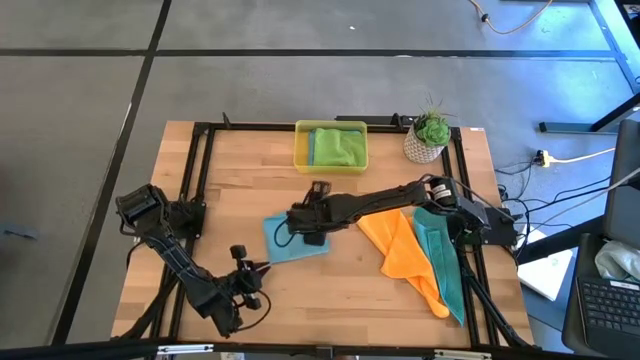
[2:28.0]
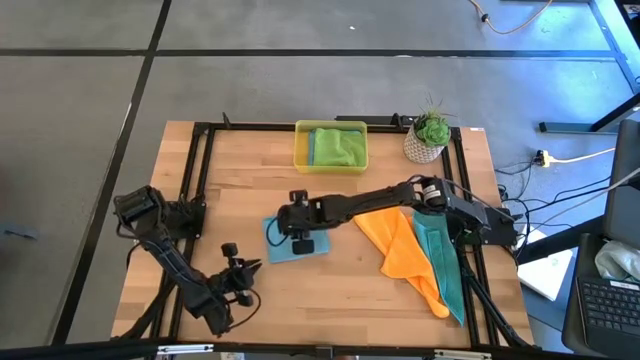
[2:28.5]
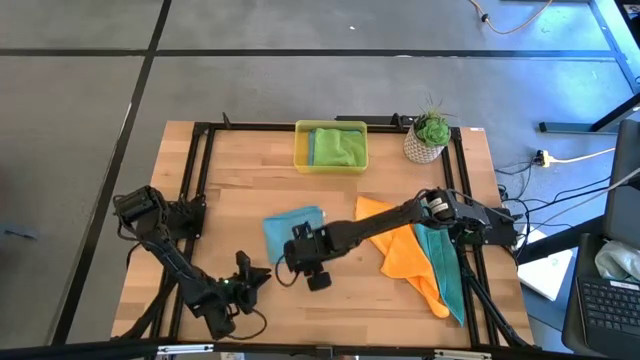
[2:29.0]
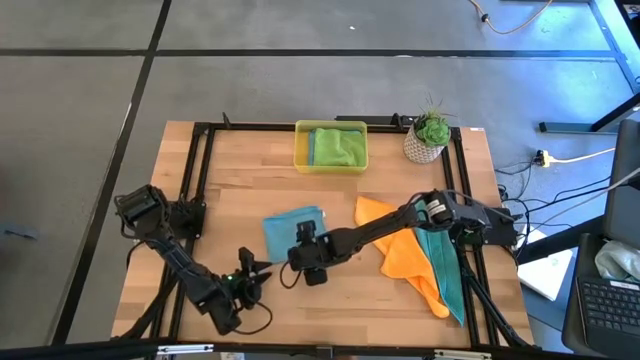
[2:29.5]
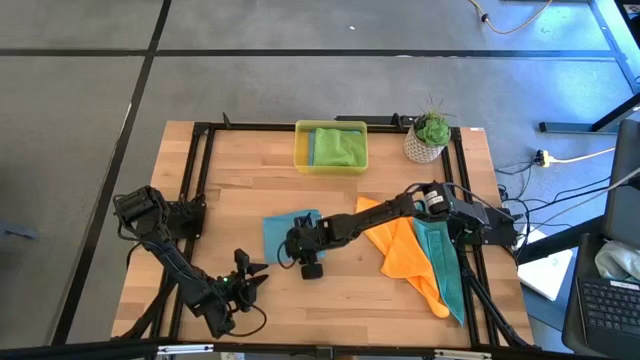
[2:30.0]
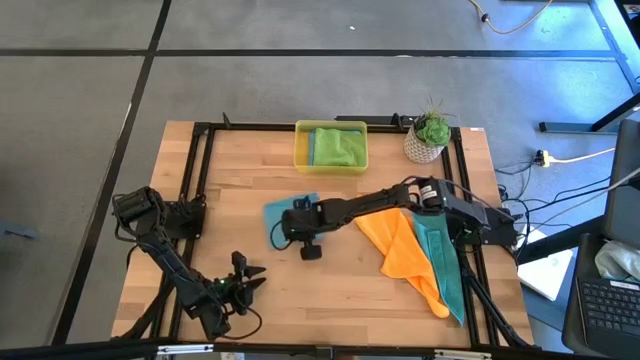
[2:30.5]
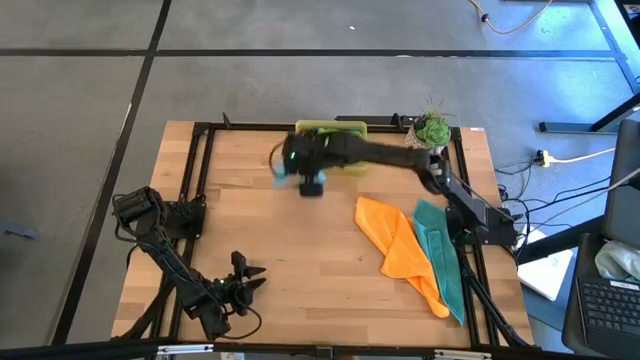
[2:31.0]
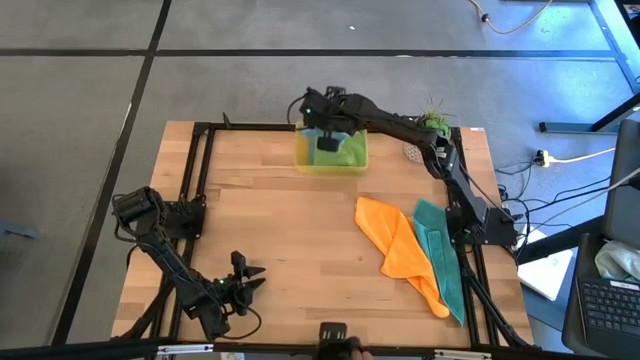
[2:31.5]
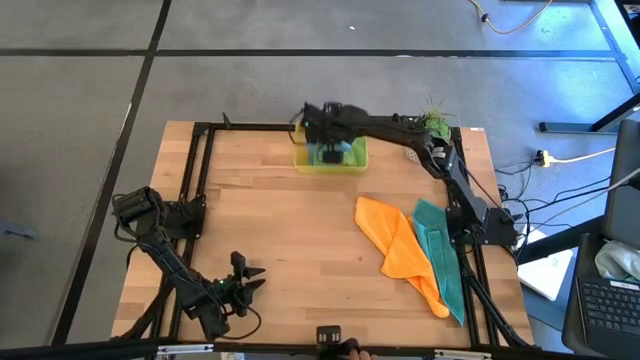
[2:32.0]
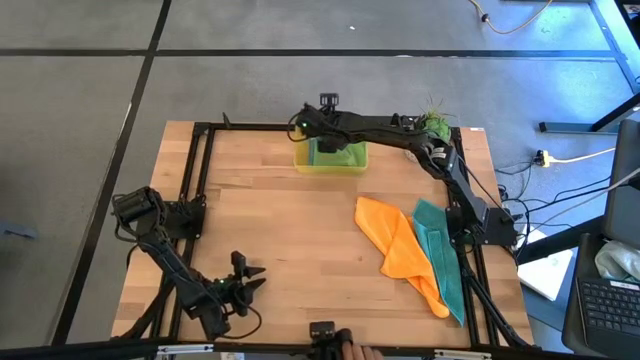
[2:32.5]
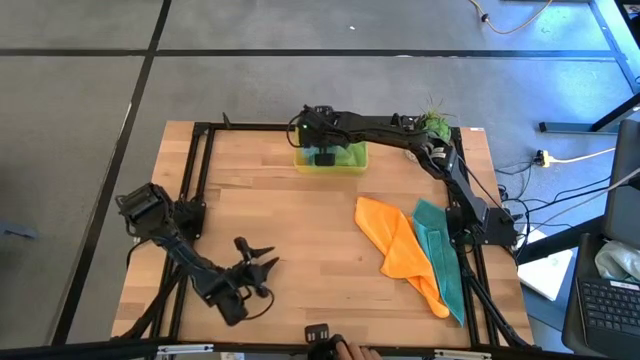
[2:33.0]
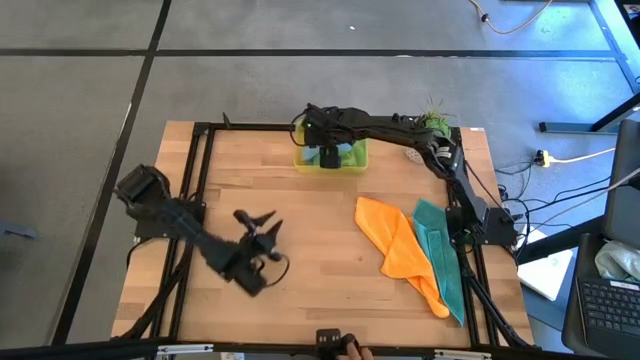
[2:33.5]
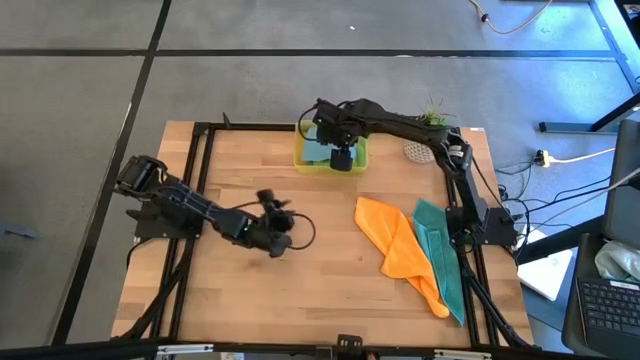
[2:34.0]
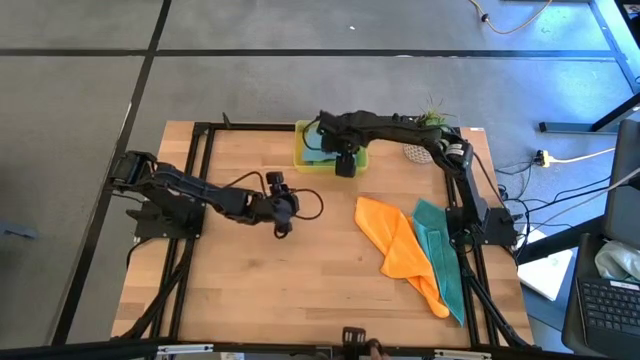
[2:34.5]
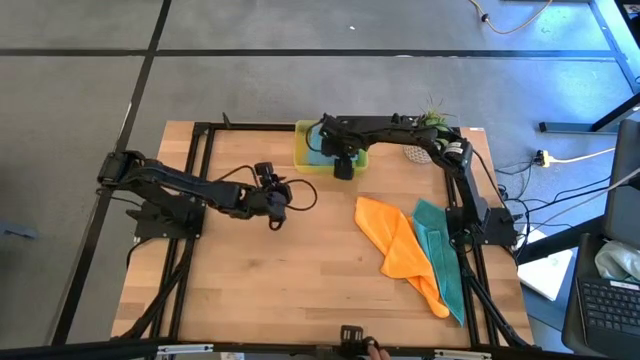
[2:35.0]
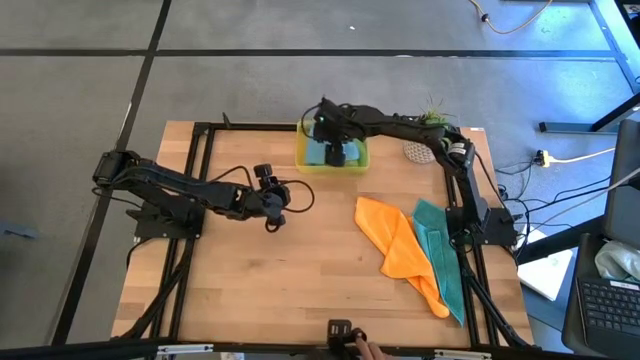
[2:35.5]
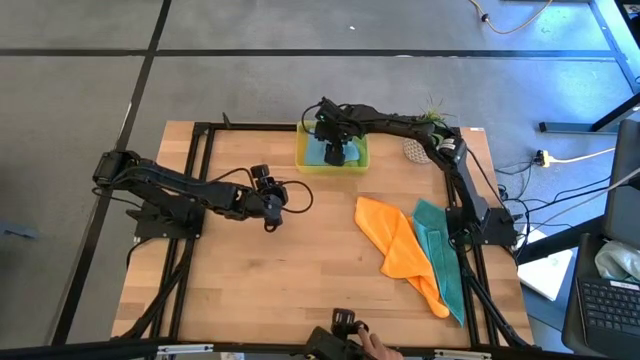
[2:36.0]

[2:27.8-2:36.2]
Task: Fold microfiber towels
Put the blue folded cloth into the yellow bin

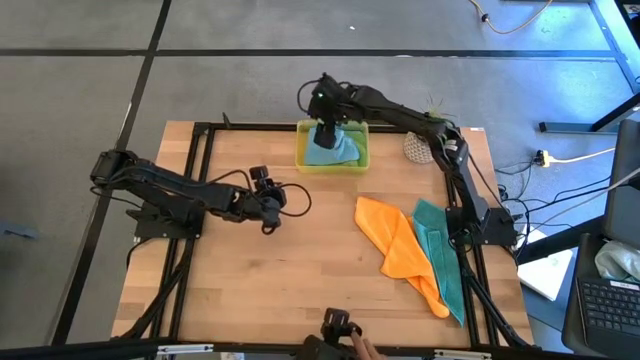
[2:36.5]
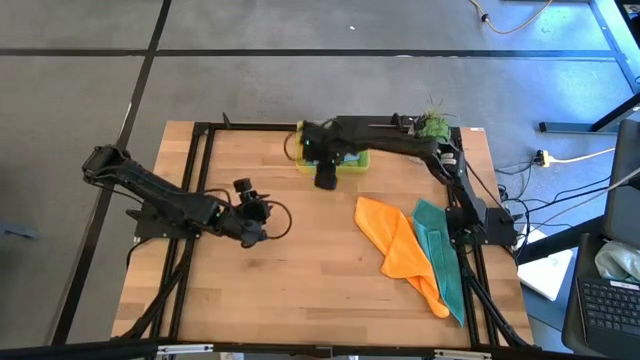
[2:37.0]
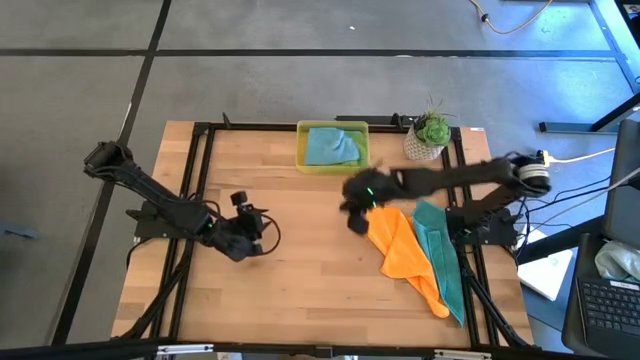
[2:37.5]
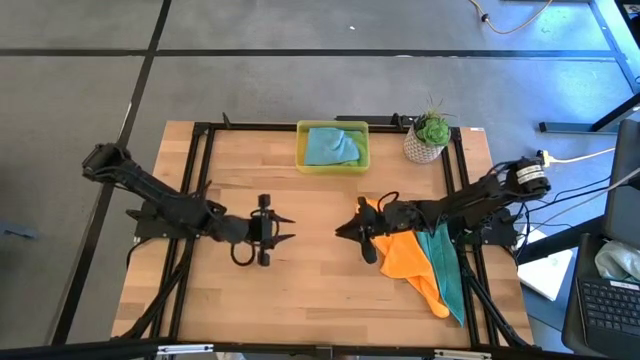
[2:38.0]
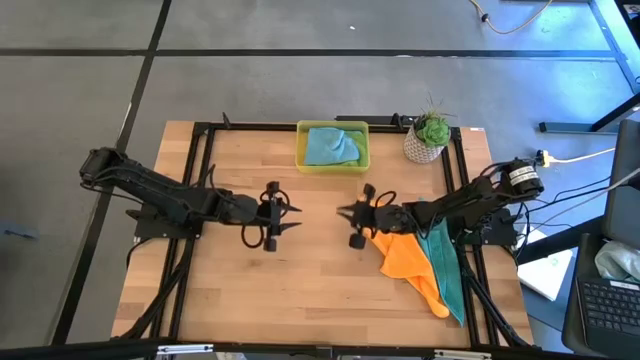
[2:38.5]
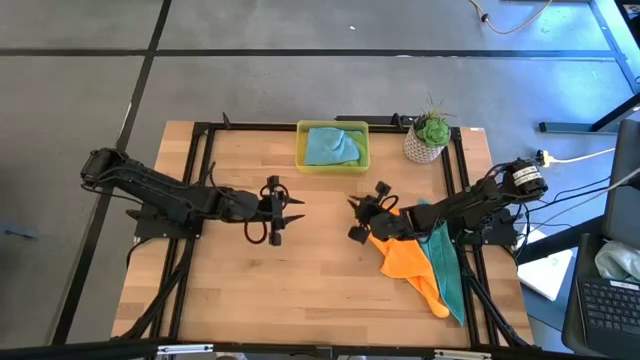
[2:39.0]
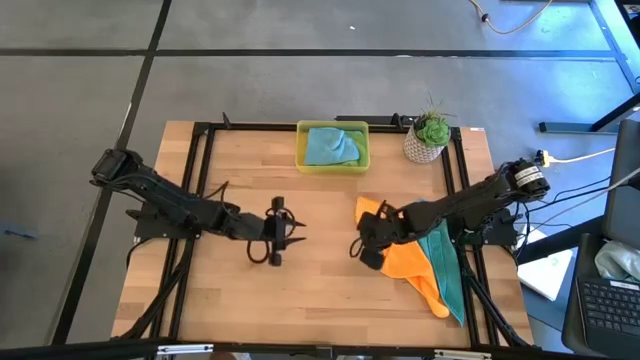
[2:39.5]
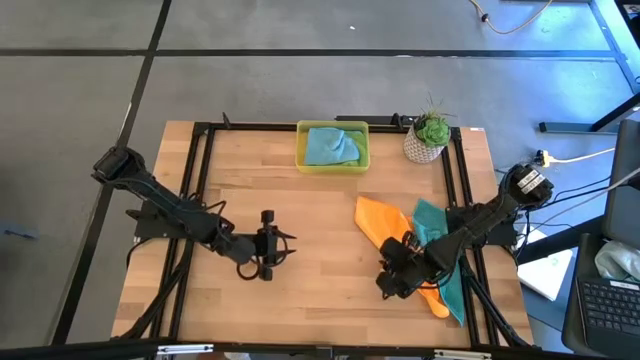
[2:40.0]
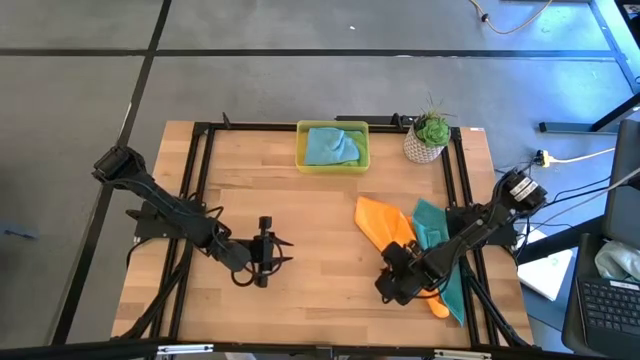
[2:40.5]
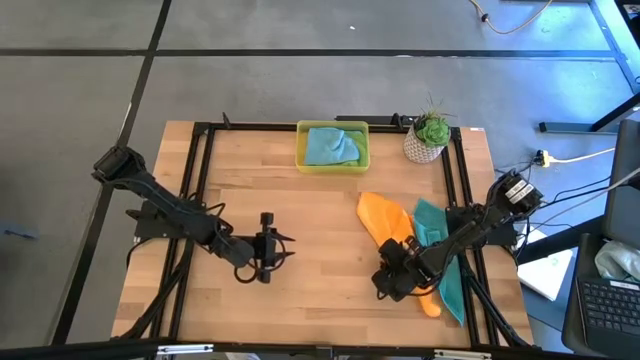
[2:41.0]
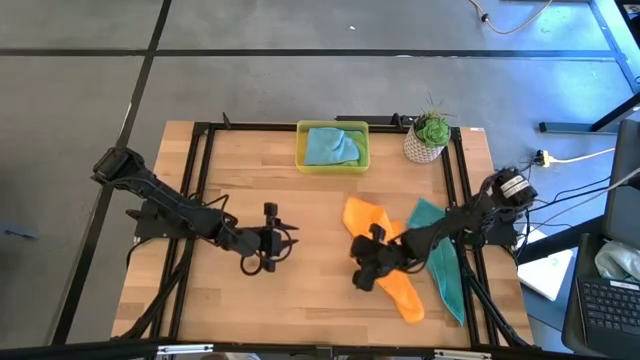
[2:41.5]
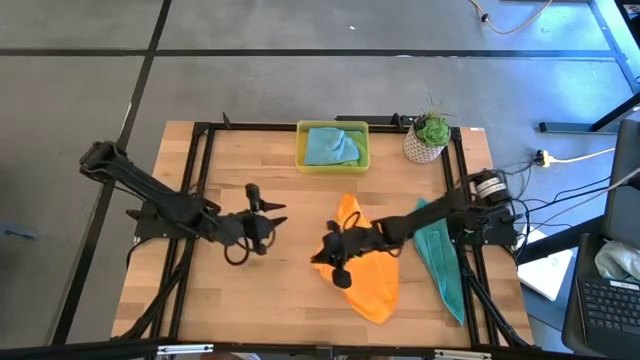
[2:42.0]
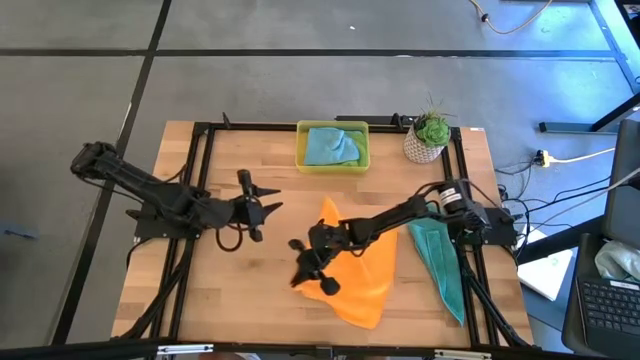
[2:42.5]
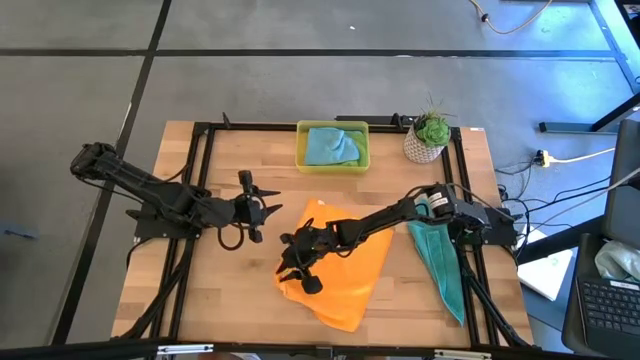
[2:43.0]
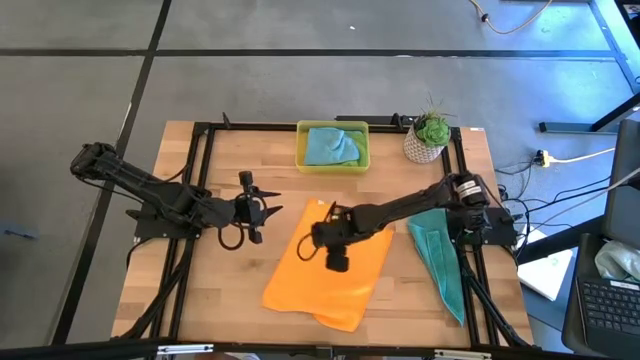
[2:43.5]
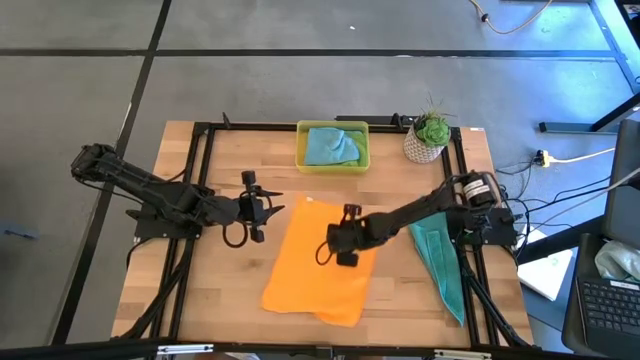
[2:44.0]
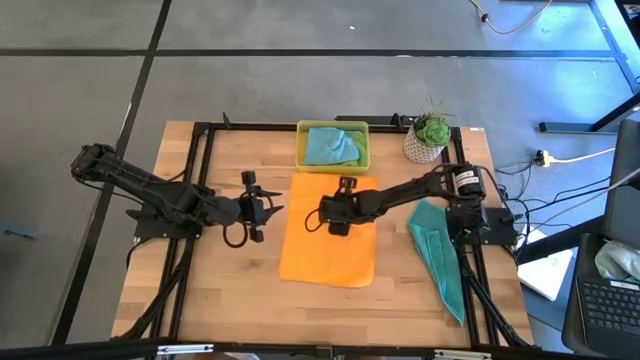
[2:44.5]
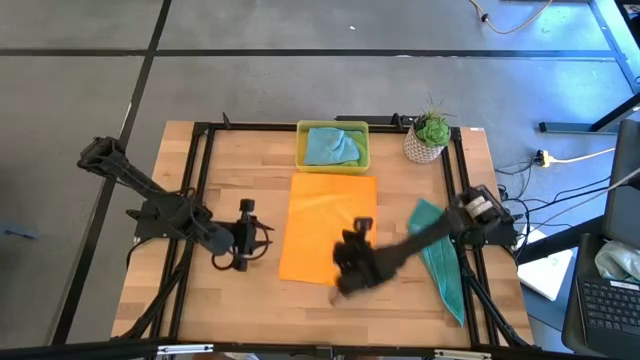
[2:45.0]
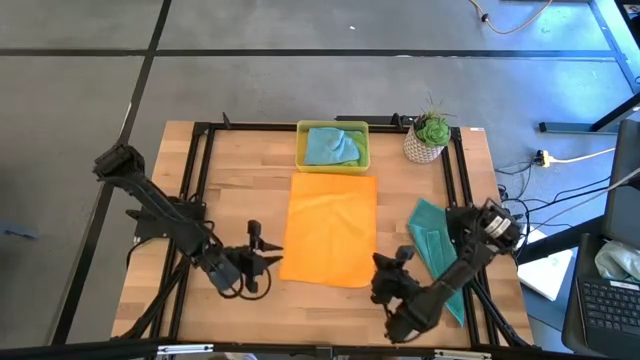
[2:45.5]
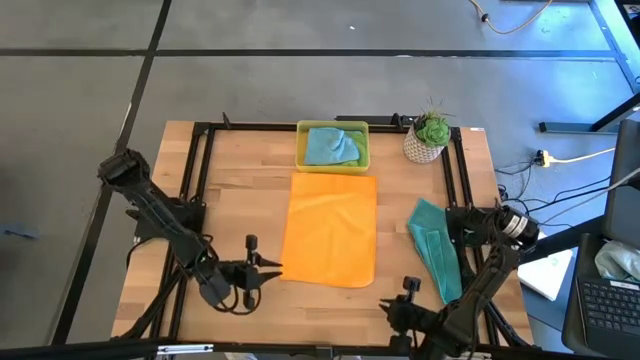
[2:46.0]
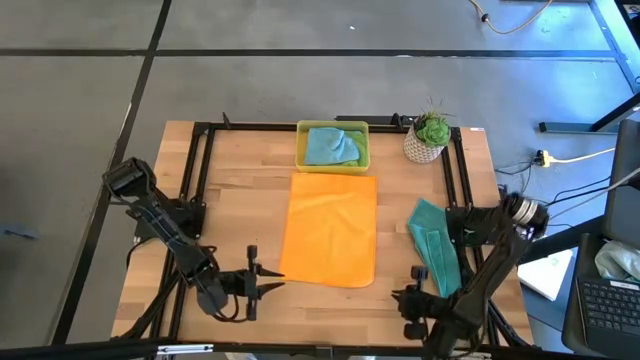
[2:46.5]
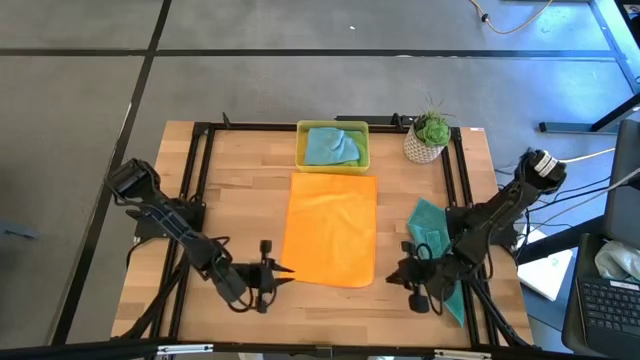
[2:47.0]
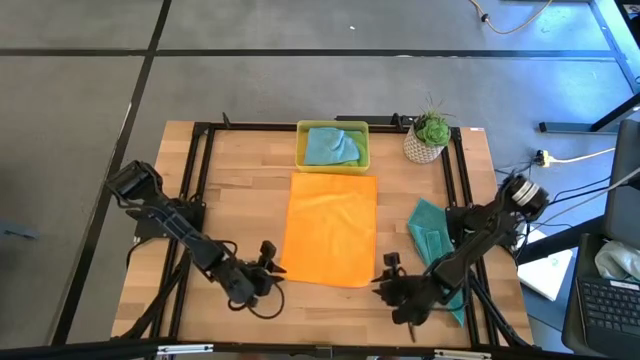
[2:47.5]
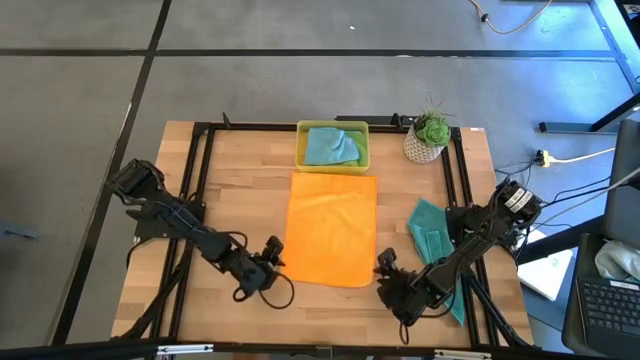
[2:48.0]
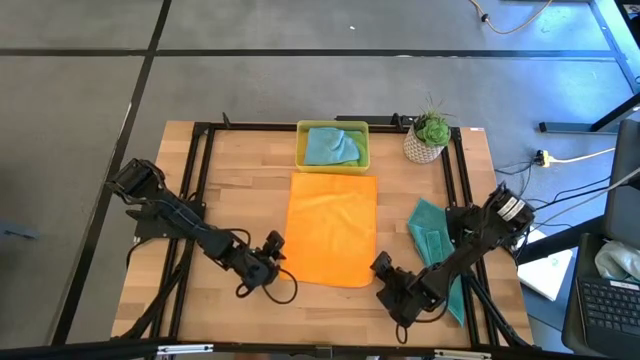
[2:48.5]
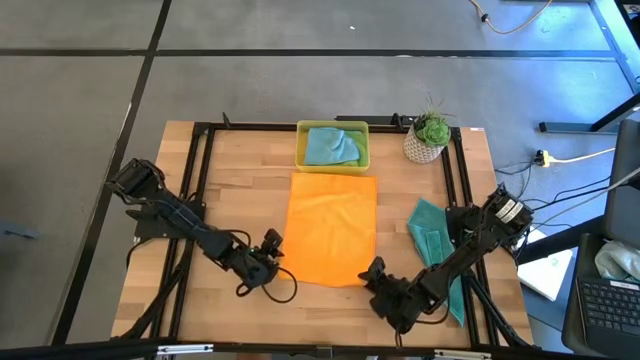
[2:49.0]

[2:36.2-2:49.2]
Fold the orange cloth
